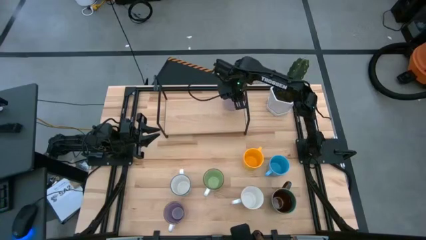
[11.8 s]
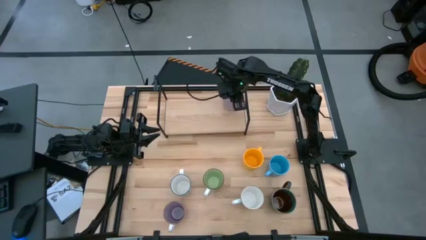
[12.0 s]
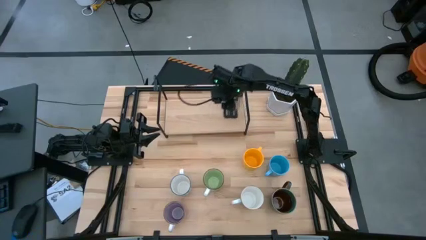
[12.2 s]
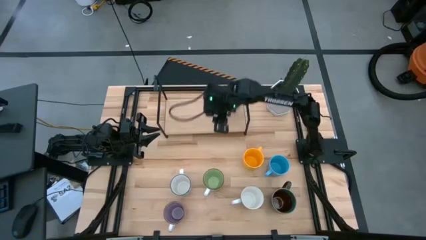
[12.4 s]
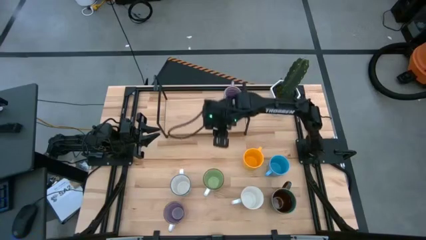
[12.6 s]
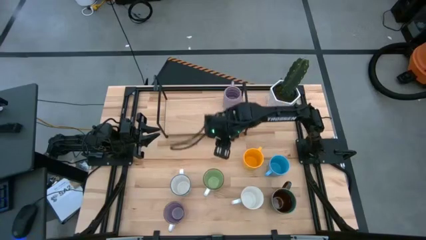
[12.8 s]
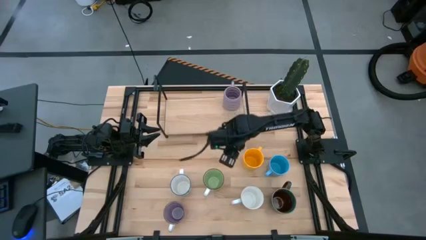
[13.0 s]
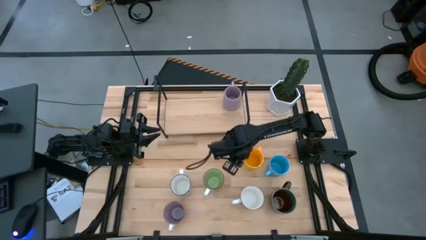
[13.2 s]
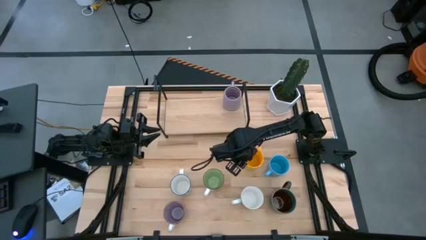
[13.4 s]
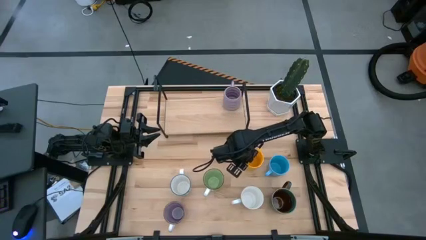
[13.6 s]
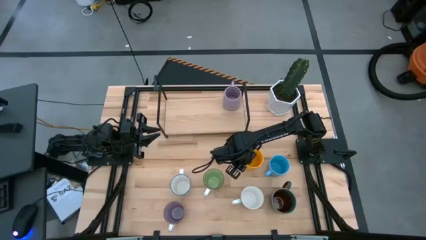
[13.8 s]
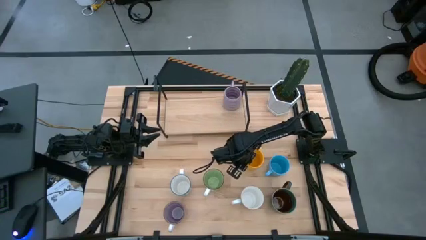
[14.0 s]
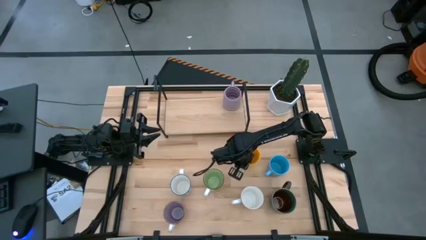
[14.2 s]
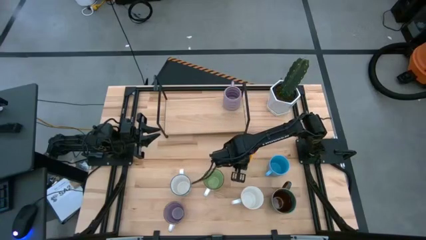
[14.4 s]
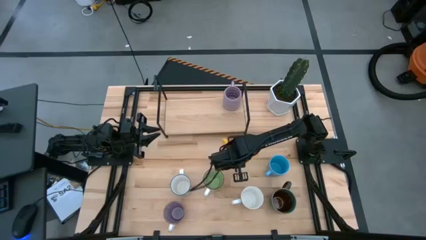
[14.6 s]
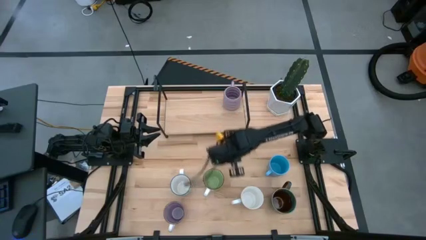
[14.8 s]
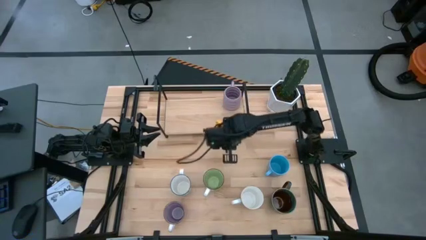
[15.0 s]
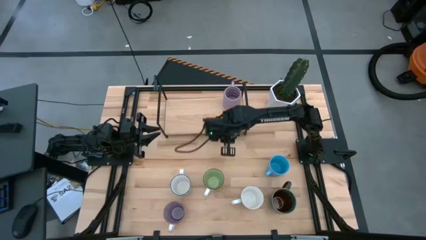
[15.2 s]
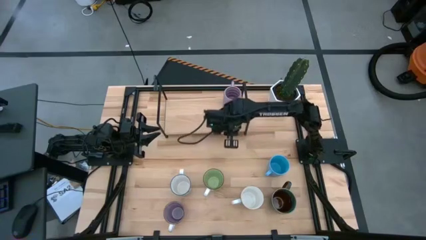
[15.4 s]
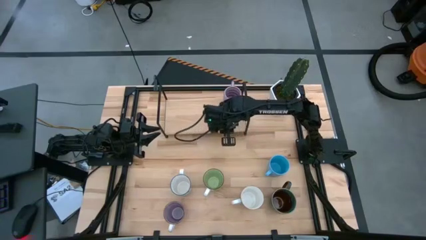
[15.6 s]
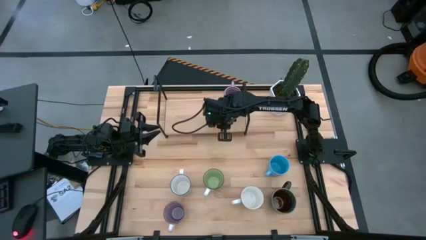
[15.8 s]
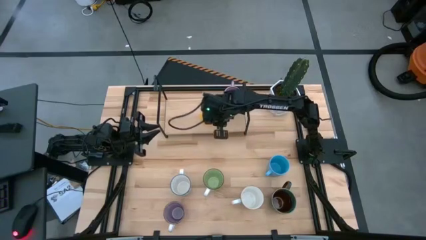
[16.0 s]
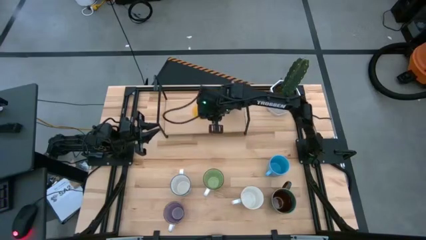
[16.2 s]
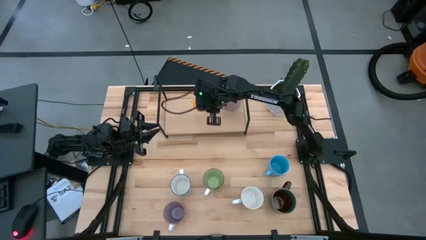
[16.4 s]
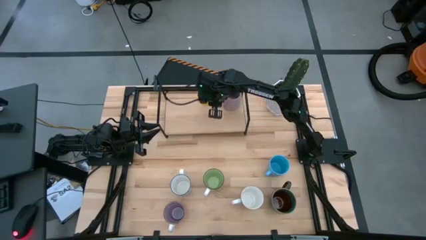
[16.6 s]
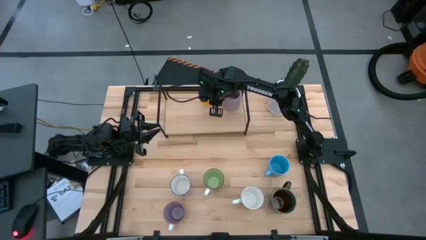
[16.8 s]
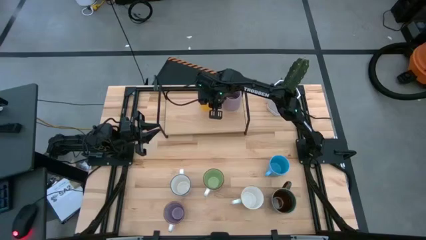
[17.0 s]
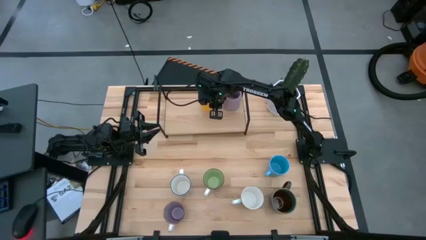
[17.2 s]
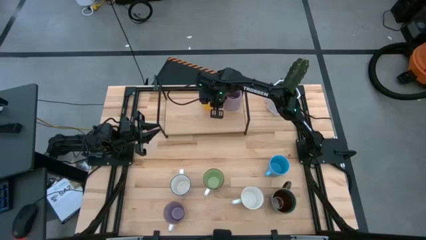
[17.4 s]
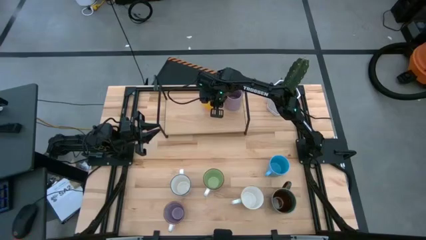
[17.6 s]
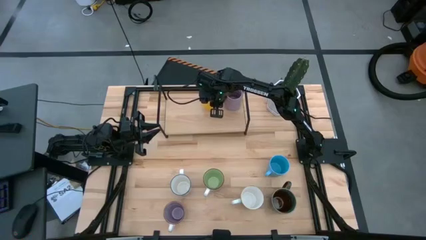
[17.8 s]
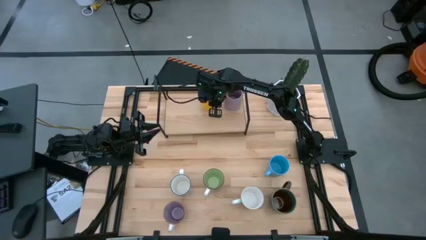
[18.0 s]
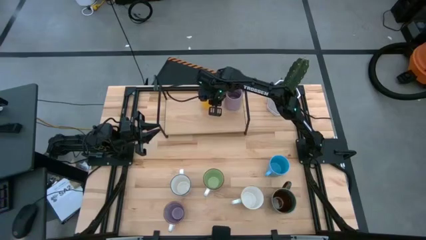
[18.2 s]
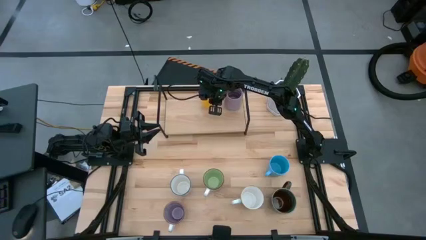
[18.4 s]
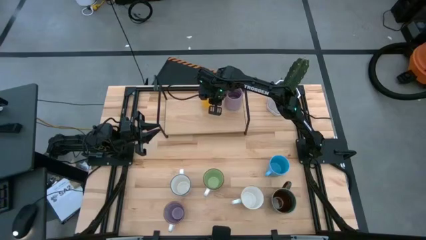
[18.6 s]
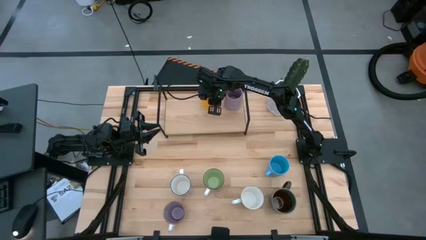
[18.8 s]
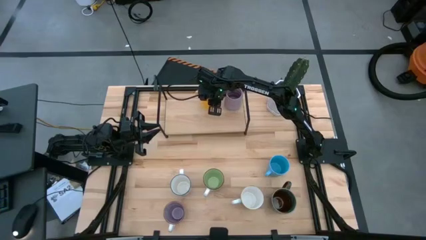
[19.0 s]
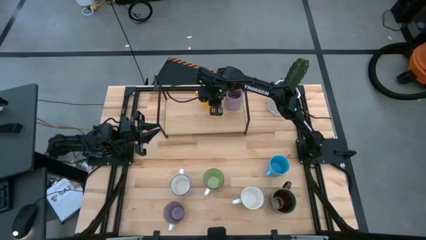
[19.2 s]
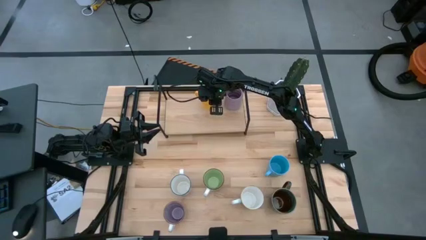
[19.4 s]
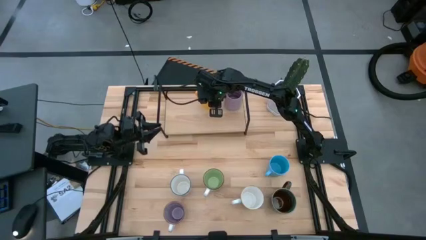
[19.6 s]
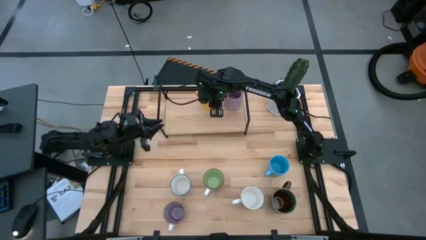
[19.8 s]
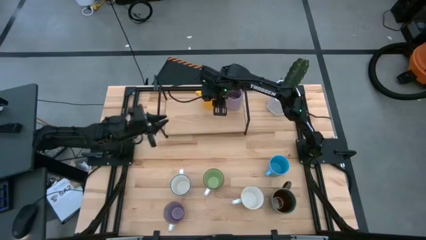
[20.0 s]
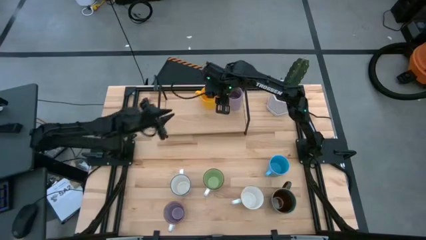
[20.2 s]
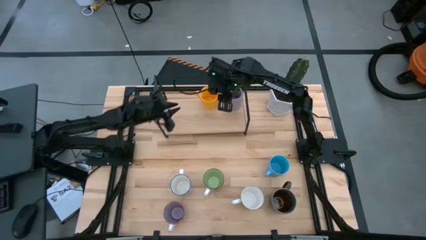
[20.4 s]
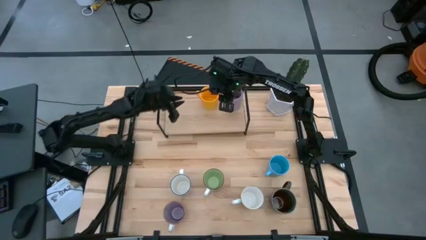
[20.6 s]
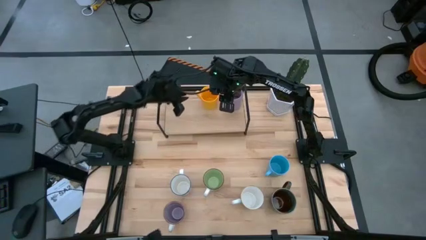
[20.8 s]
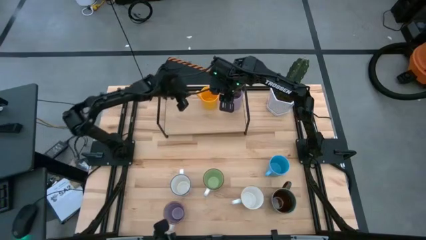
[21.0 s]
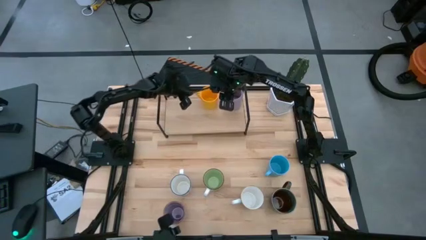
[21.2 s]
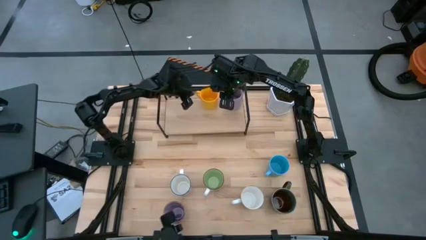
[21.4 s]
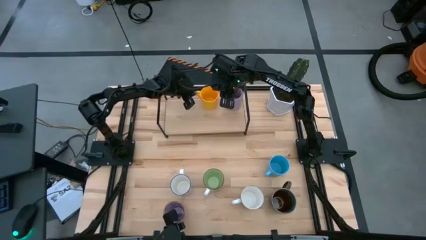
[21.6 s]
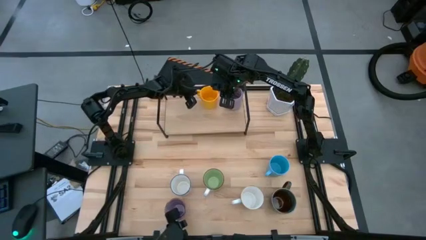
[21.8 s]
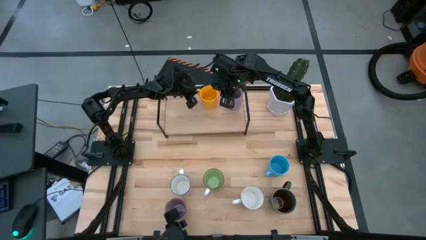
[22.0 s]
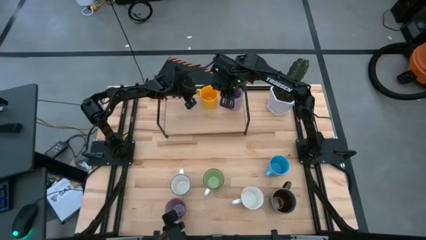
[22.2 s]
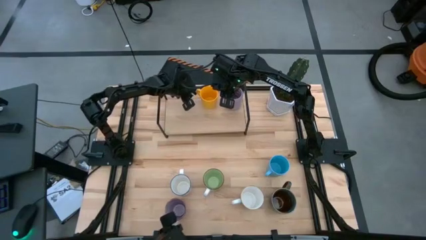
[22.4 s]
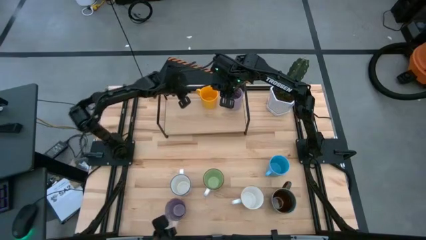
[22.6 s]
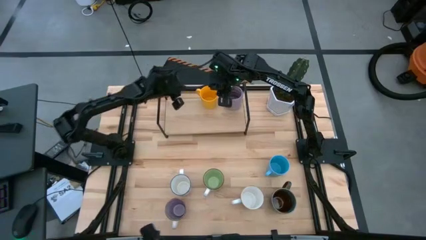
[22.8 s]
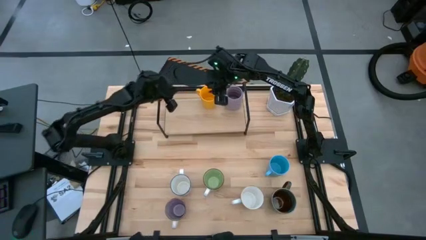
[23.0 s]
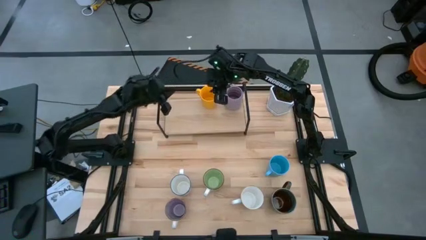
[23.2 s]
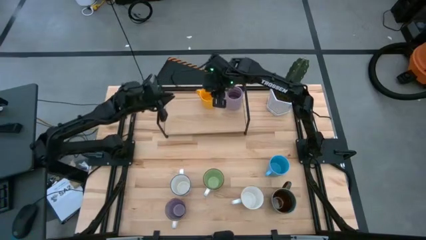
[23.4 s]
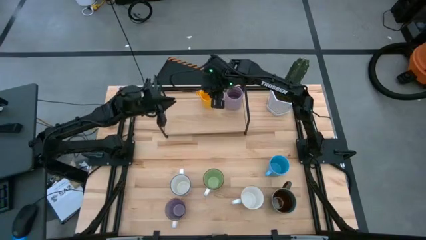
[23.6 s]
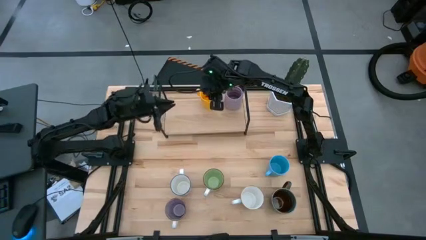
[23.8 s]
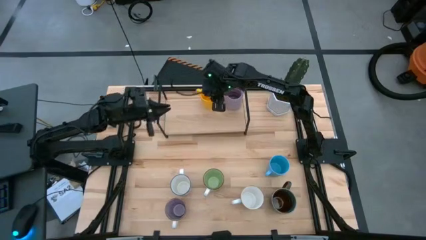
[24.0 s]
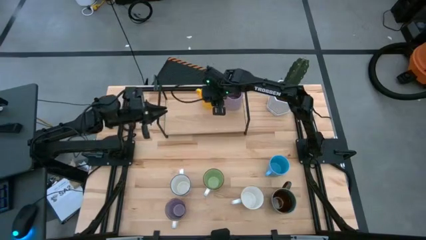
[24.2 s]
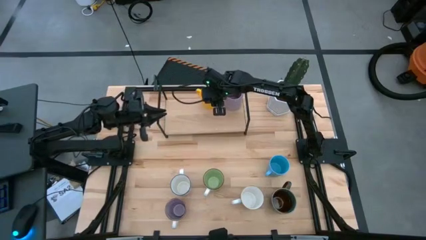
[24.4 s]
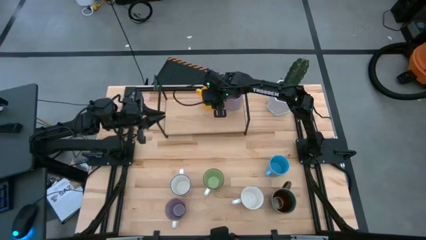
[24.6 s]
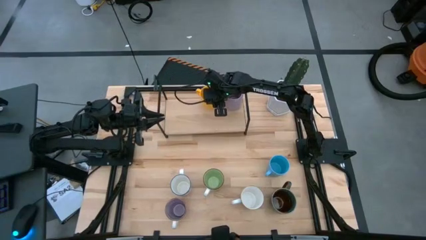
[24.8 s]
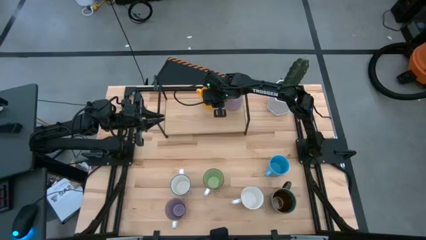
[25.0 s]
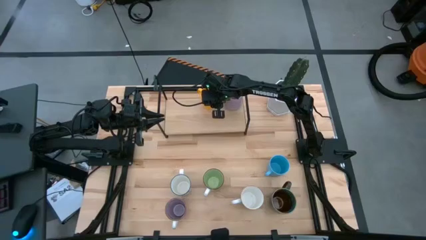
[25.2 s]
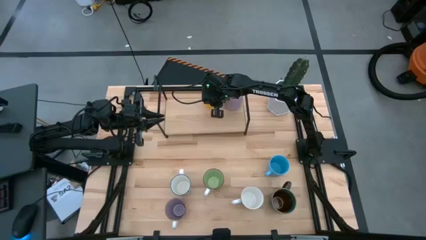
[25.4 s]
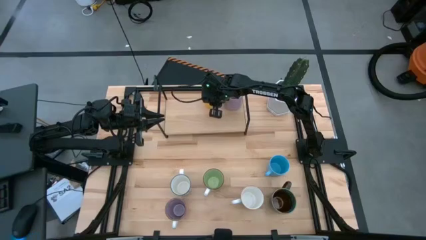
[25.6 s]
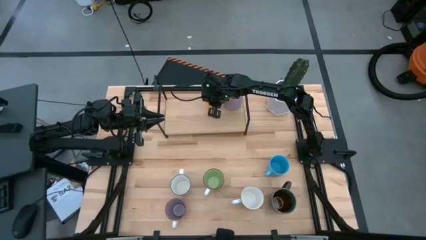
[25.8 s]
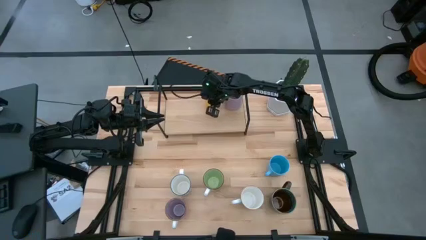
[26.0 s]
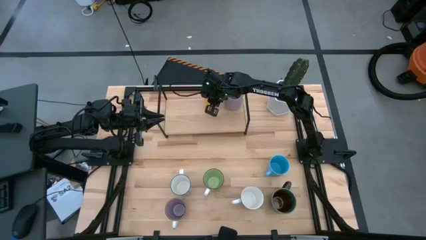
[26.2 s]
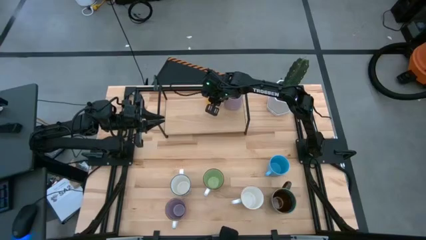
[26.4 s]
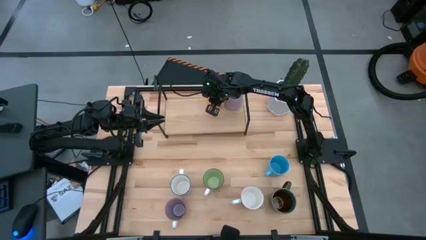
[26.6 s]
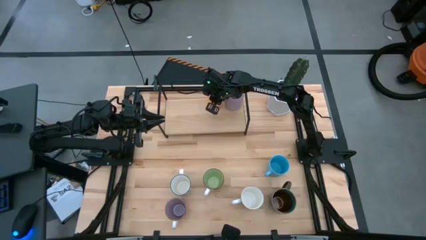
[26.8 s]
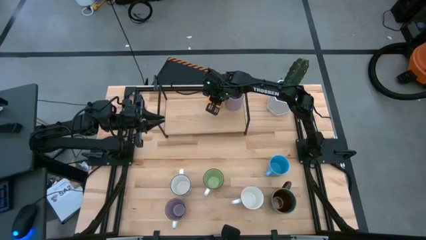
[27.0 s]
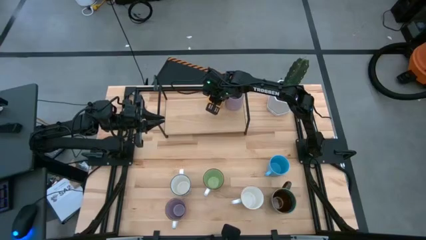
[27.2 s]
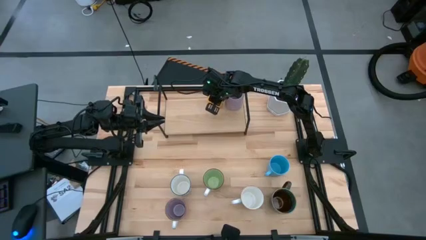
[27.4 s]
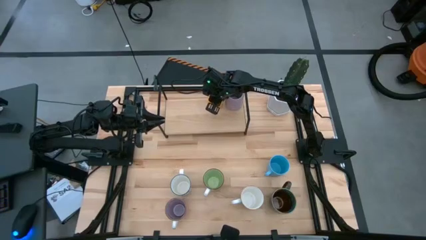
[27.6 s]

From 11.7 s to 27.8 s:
Task: Place coffee mugs
Put the yellow mug on the shelf
